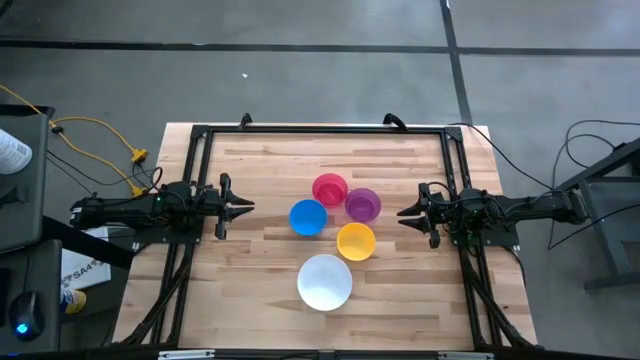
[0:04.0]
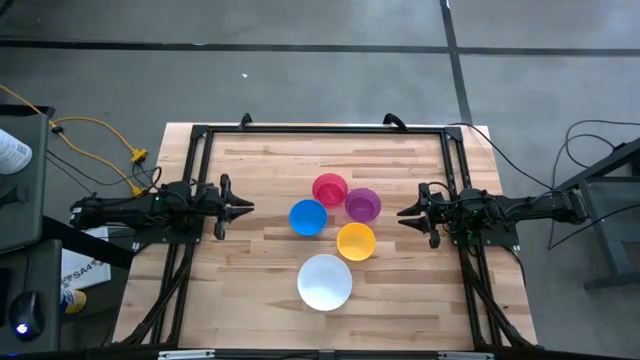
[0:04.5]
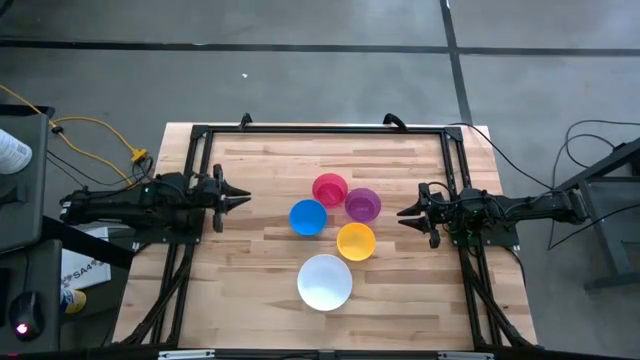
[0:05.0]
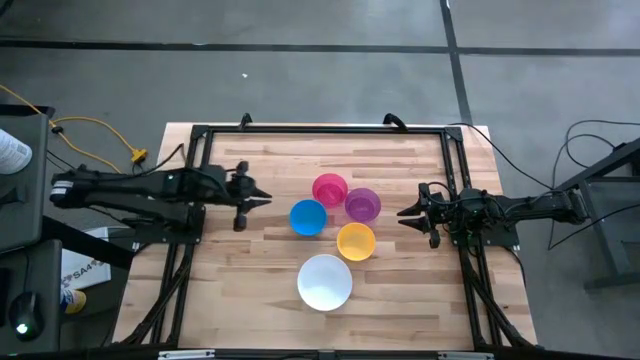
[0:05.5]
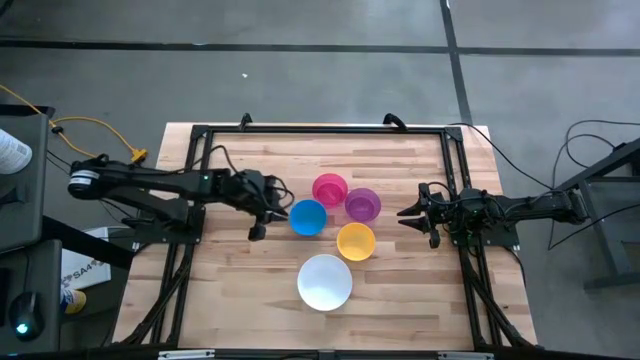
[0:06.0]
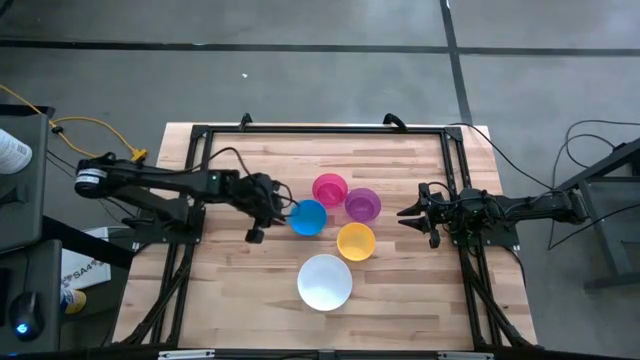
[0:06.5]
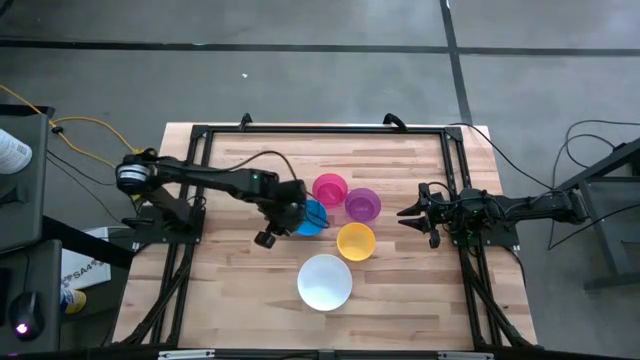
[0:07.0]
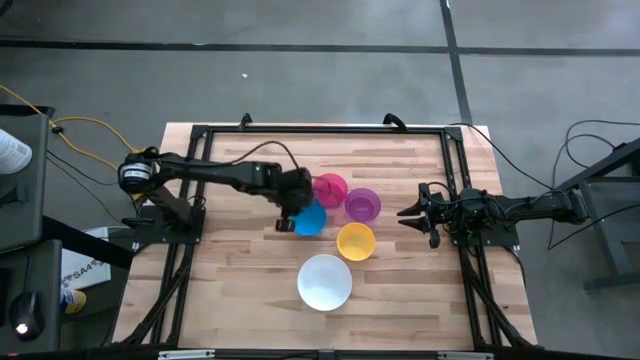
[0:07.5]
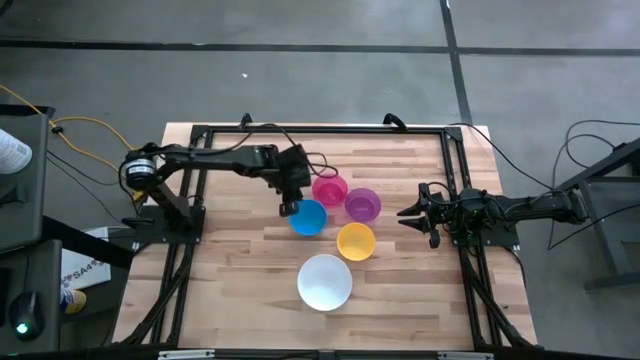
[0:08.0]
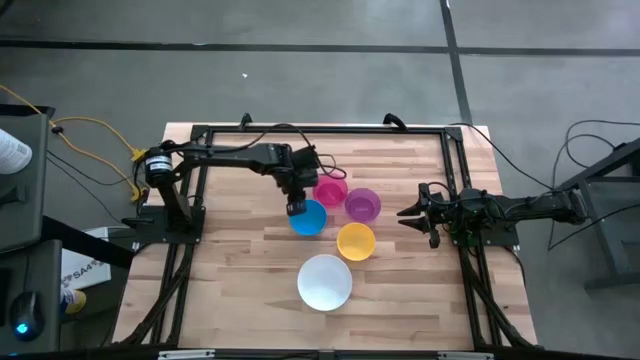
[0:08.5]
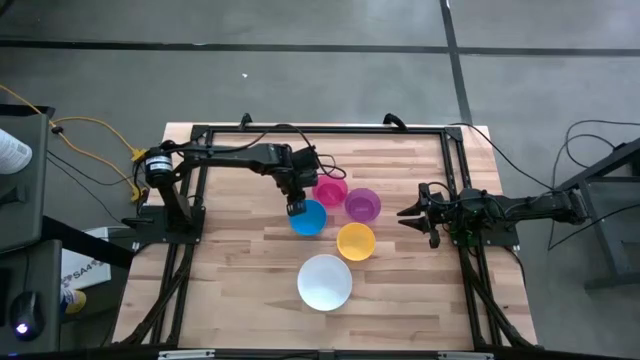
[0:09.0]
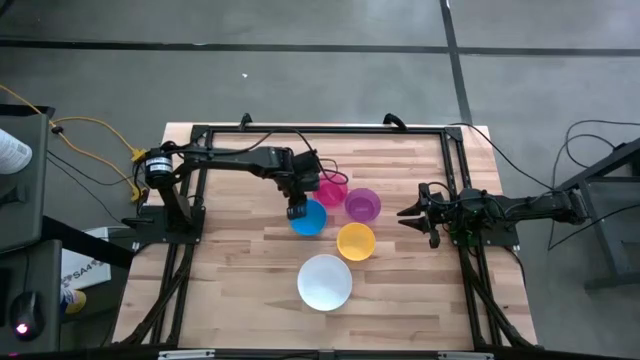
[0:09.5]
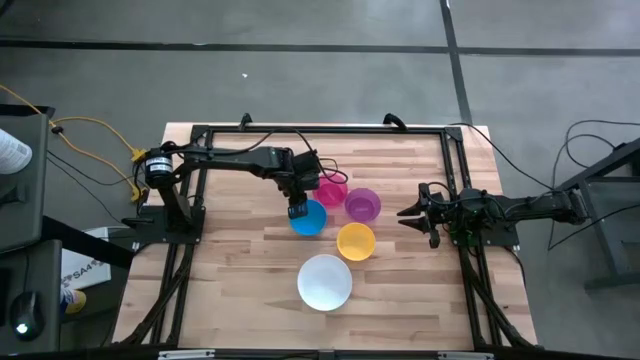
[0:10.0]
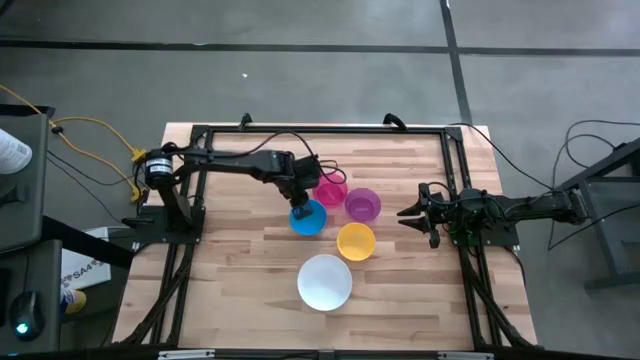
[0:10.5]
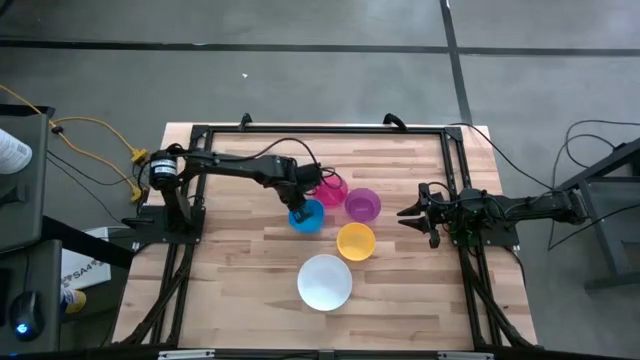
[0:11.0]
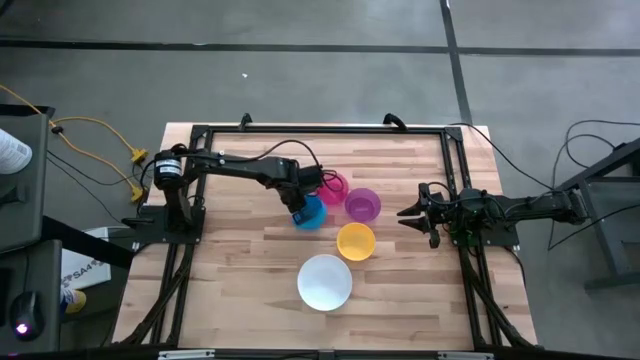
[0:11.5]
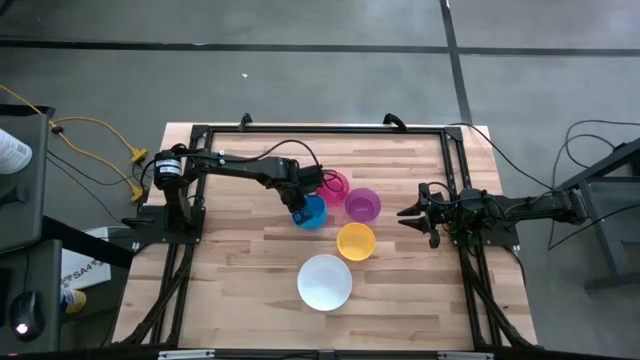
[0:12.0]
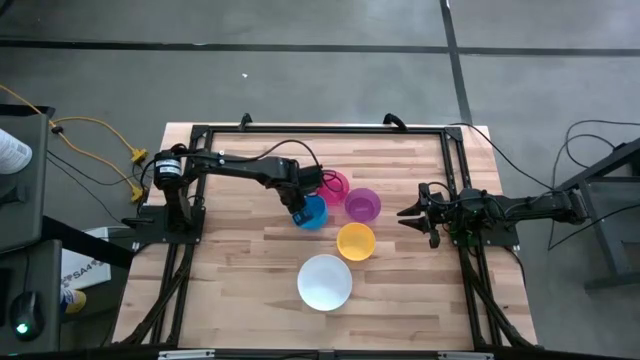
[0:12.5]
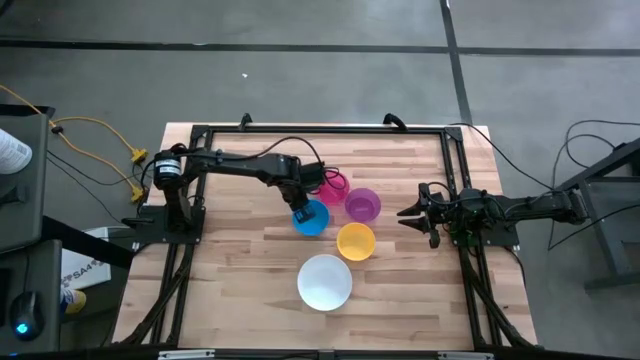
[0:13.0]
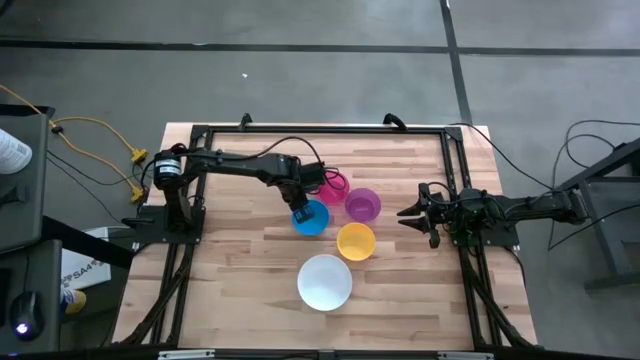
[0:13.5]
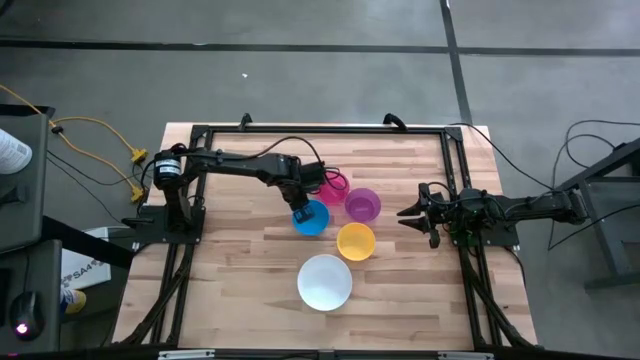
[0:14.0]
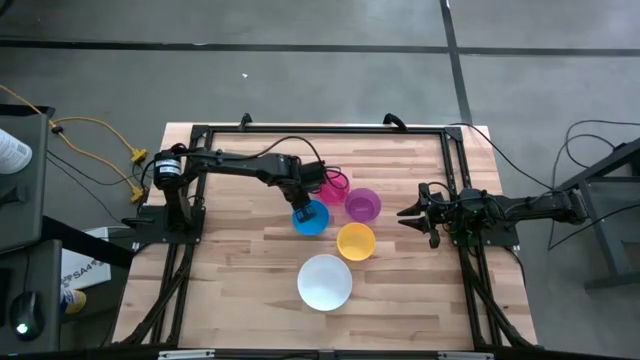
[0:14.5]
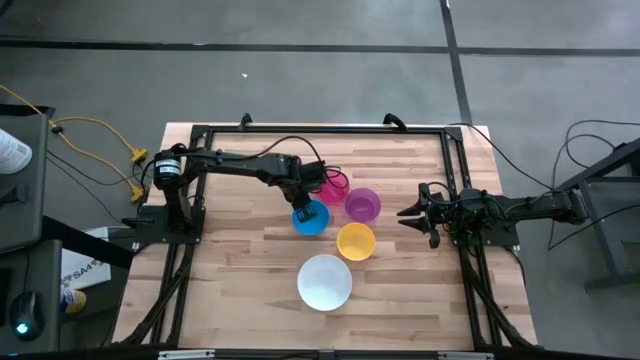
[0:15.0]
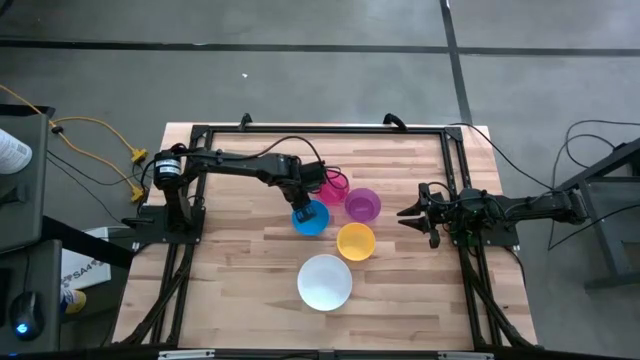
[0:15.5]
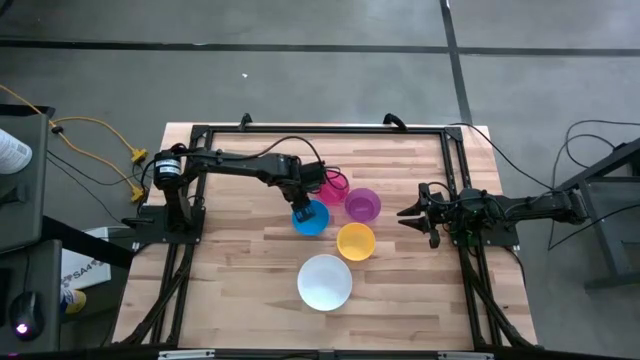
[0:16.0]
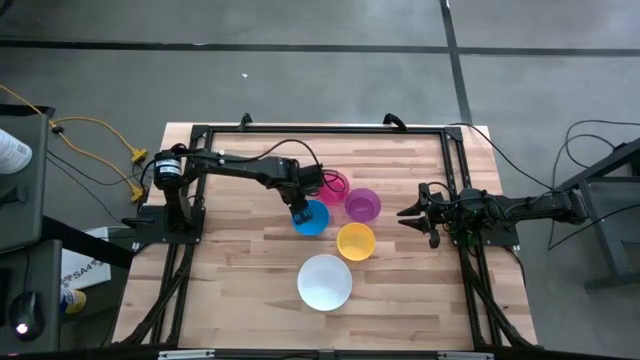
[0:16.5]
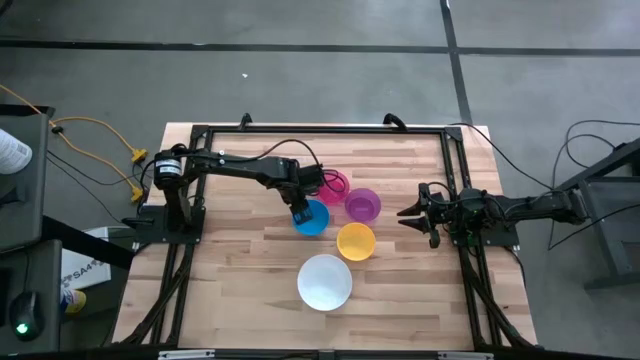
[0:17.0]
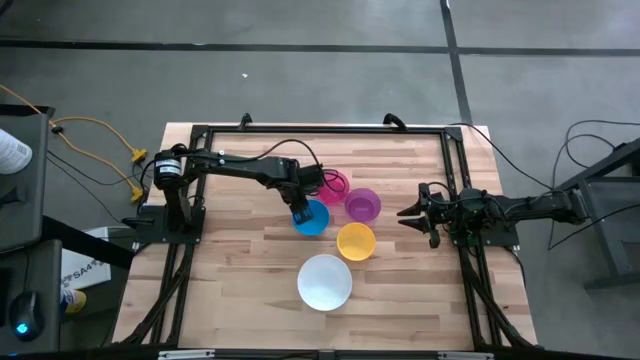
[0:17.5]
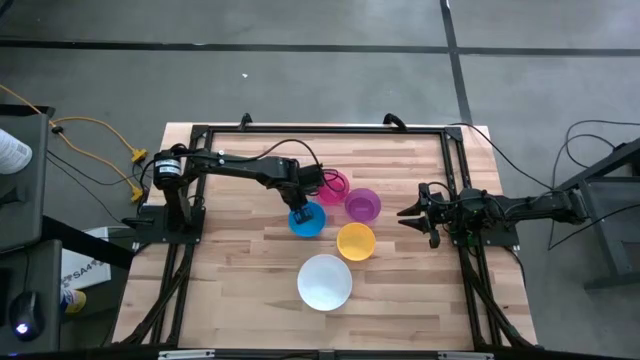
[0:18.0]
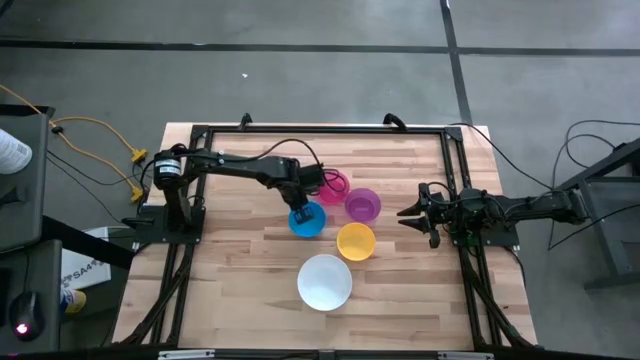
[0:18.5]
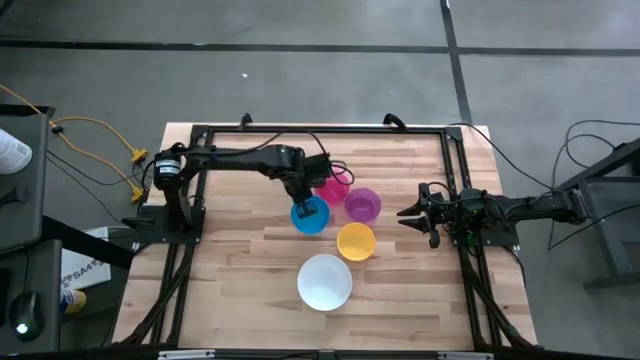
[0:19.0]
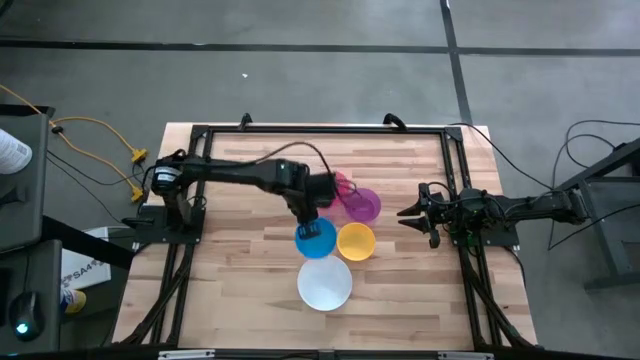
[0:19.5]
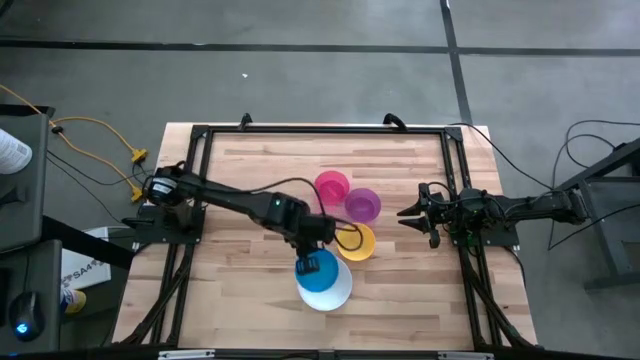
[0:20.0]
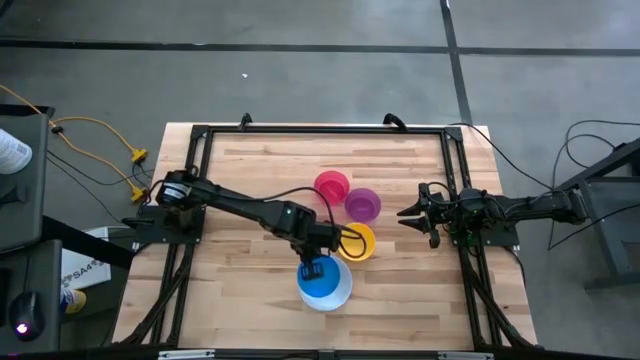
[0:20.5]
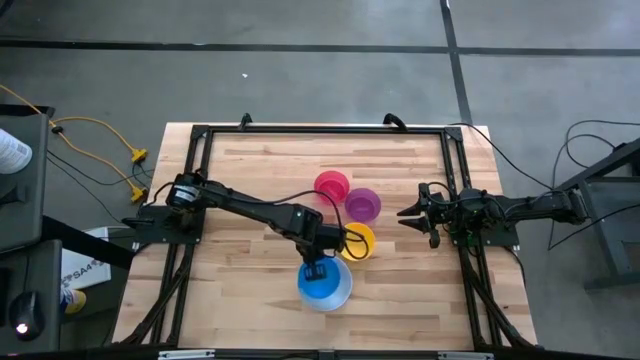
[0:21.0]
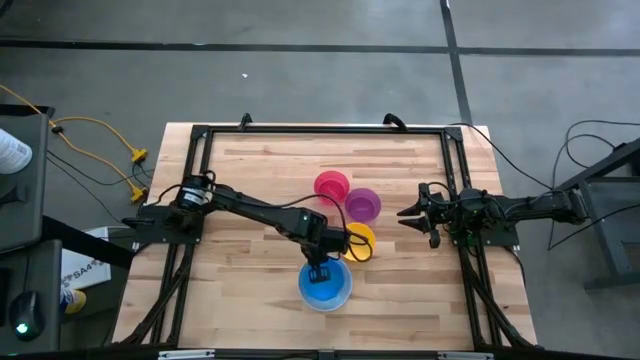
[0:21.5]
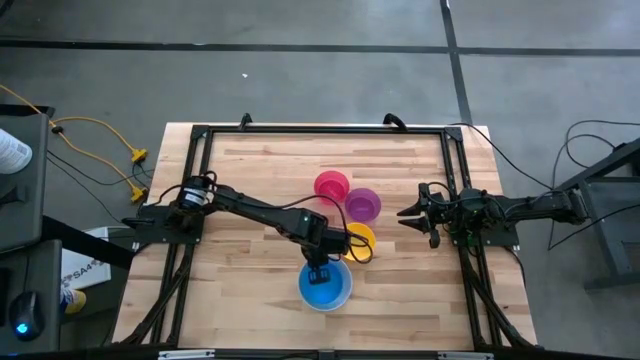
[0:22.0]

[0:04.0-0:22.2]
Stack the blue bowl on top of the white bowl

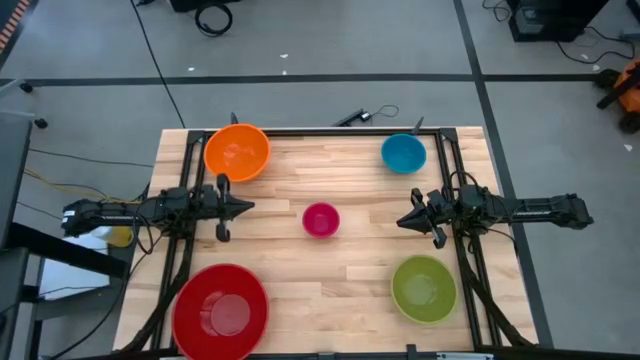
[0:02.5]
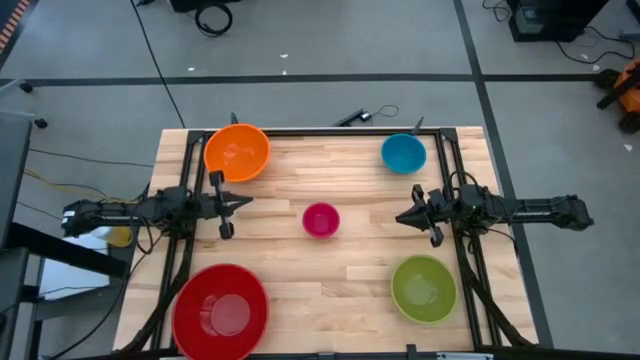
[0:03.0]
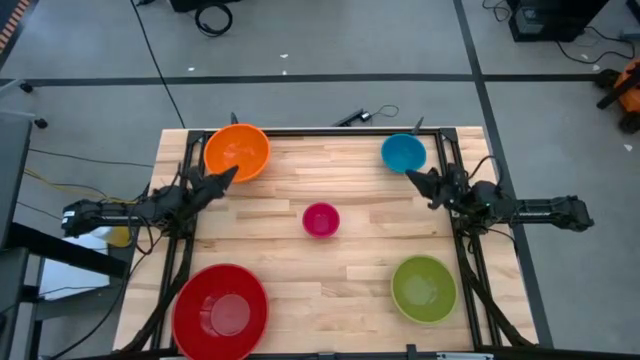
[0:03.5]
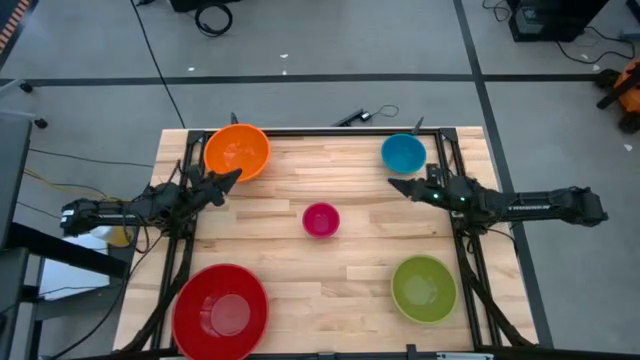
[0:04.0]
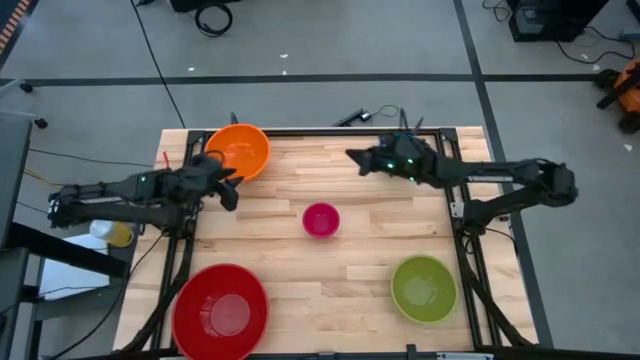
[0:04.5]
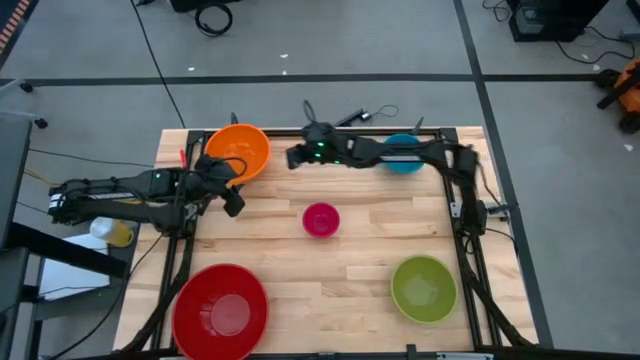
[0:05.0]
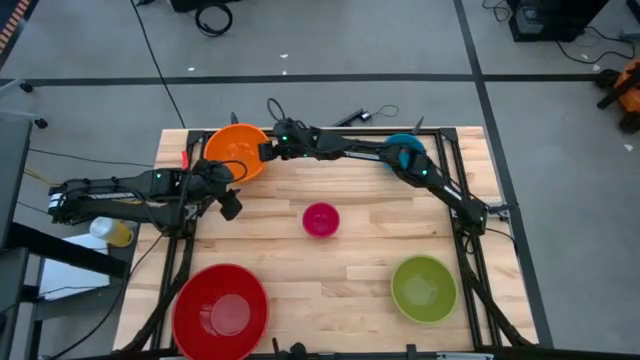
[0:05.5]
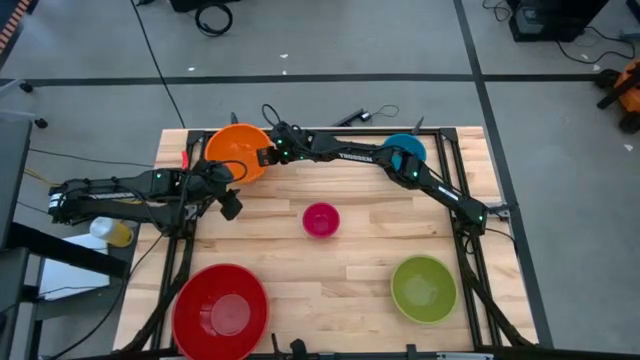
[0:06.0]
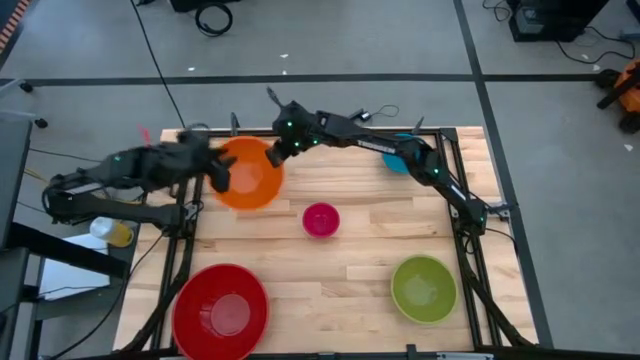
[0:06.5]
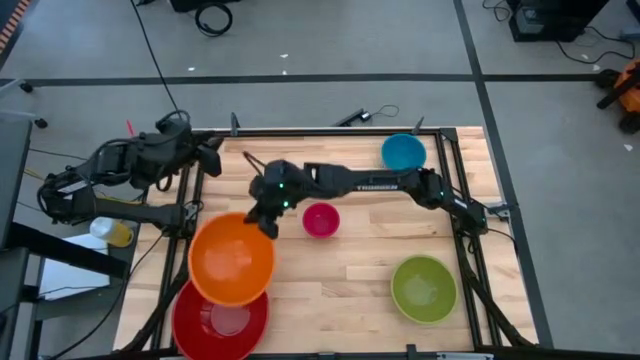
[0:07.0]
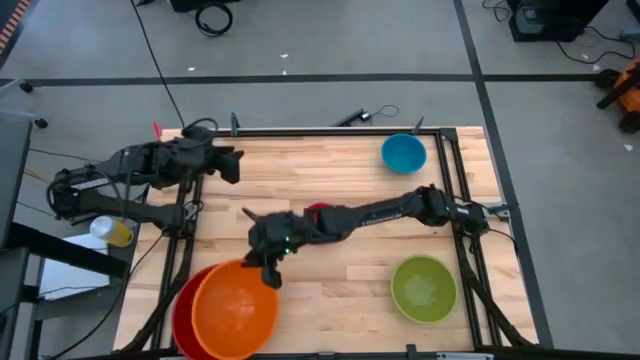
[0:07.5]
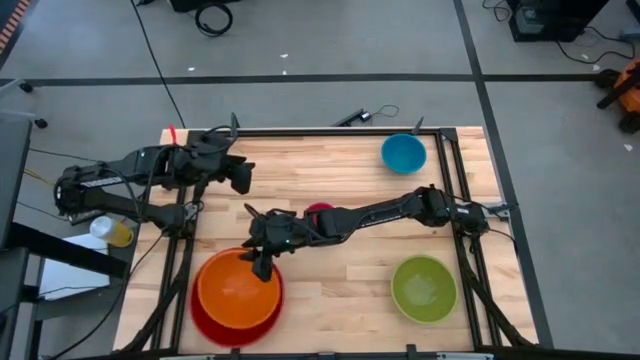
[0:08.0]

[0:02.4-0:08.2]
Stack the orange bowl on the red bowl
